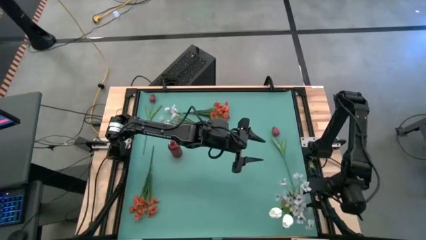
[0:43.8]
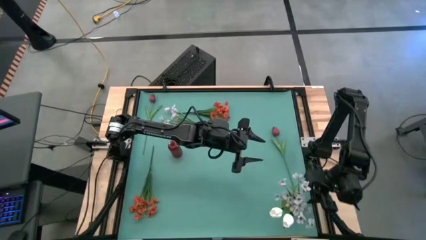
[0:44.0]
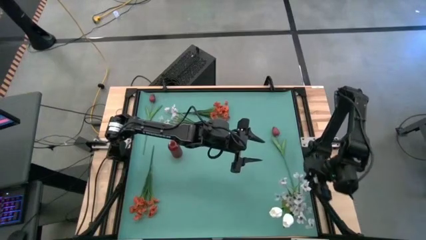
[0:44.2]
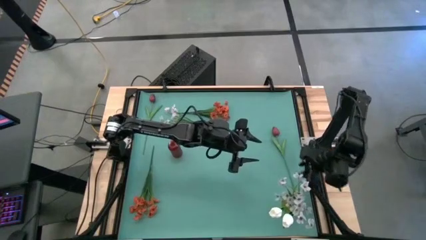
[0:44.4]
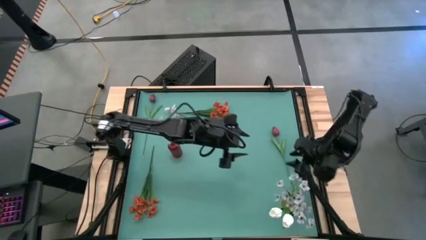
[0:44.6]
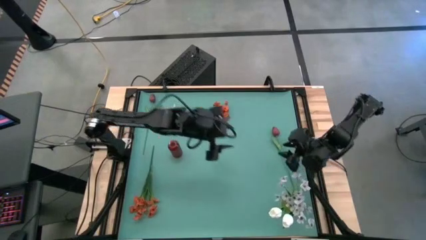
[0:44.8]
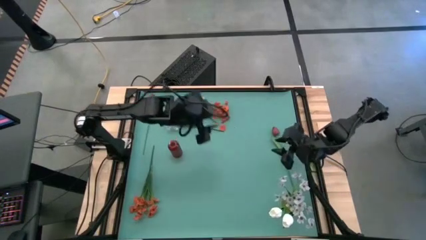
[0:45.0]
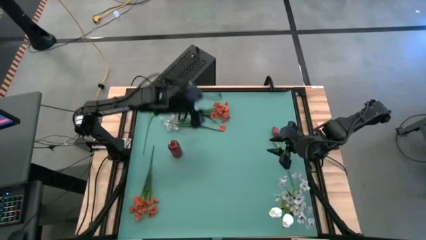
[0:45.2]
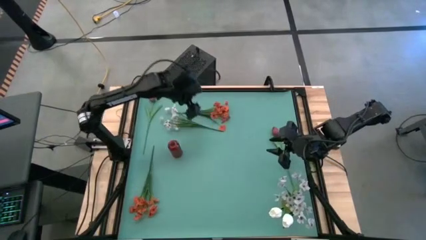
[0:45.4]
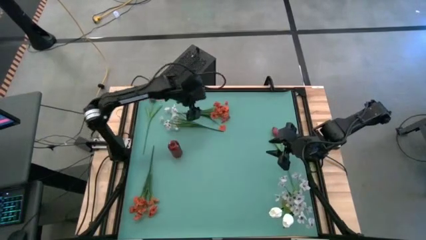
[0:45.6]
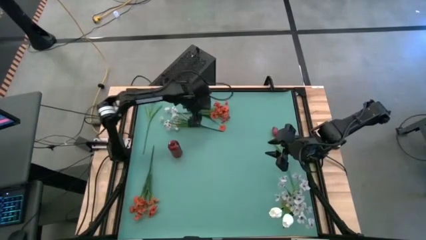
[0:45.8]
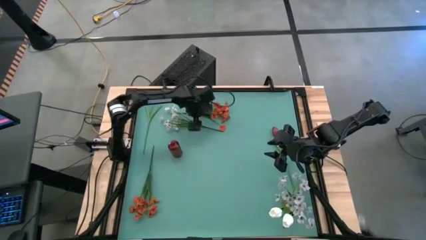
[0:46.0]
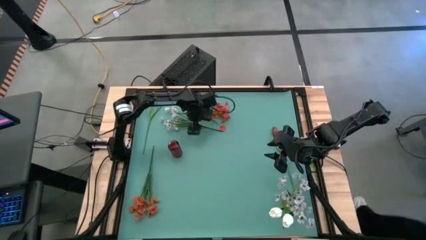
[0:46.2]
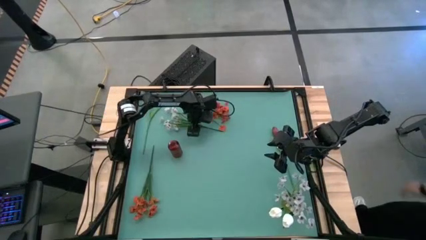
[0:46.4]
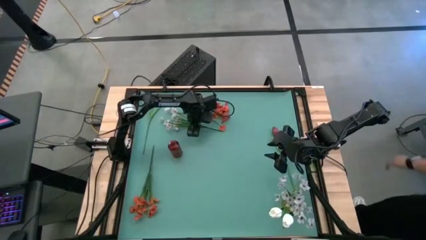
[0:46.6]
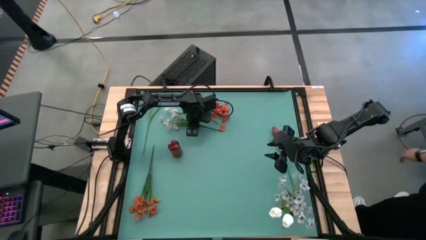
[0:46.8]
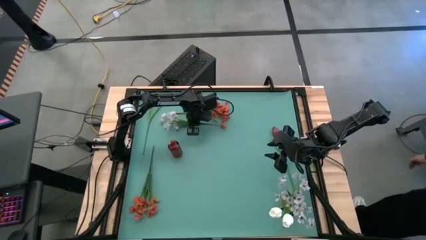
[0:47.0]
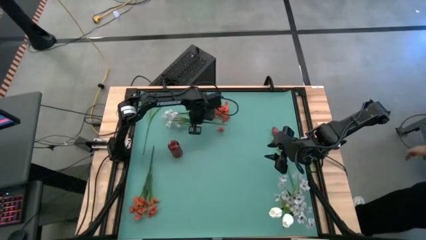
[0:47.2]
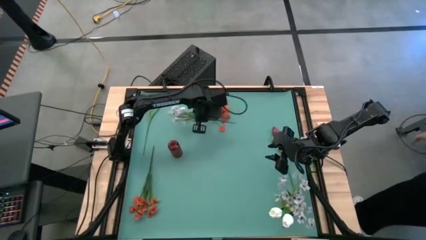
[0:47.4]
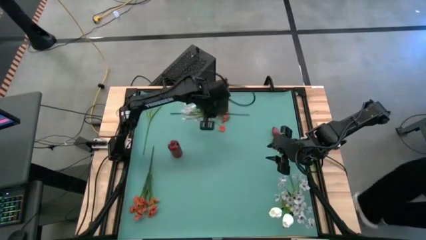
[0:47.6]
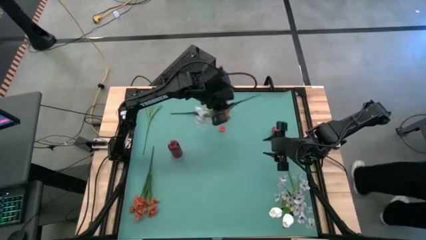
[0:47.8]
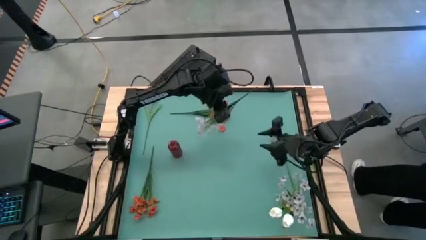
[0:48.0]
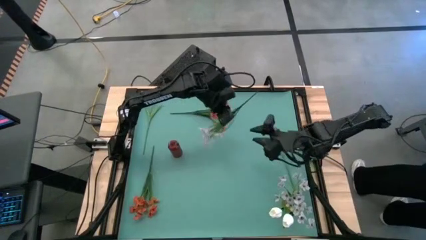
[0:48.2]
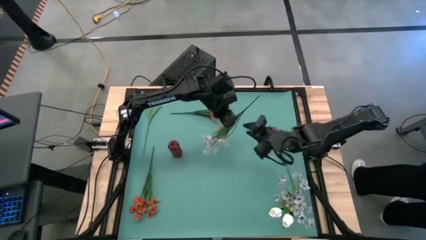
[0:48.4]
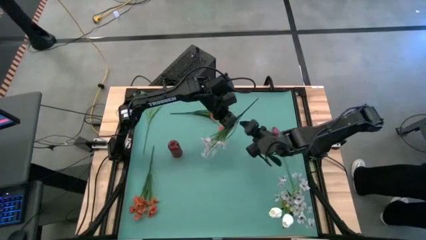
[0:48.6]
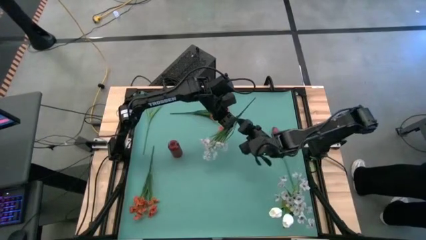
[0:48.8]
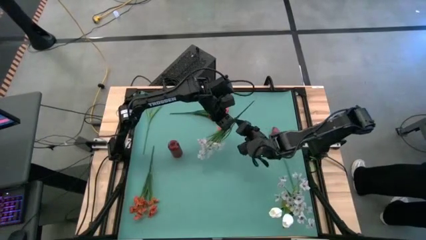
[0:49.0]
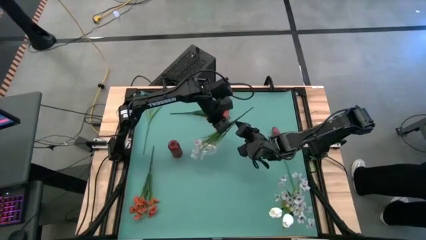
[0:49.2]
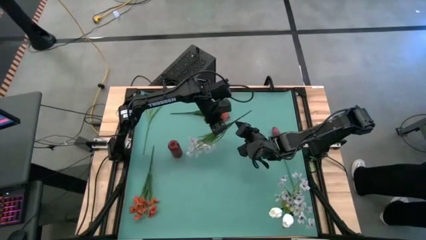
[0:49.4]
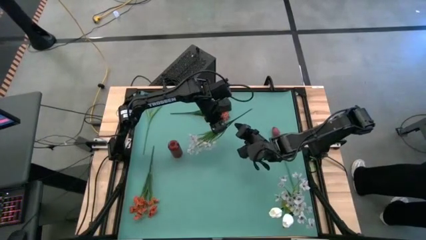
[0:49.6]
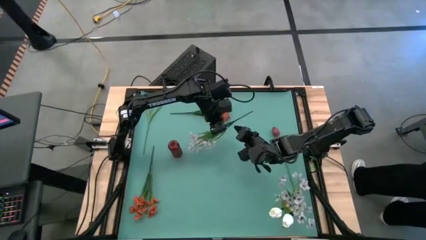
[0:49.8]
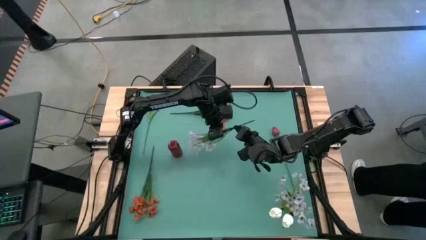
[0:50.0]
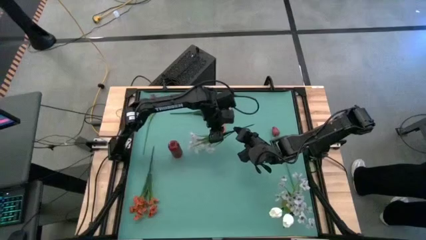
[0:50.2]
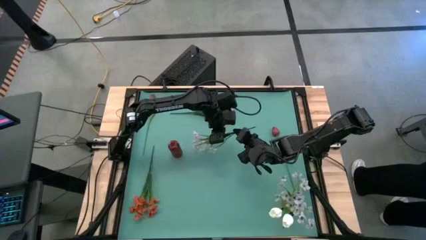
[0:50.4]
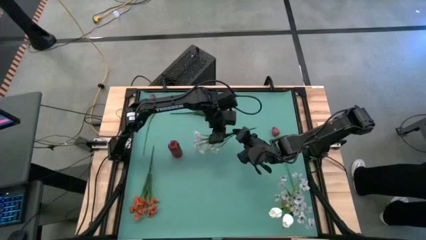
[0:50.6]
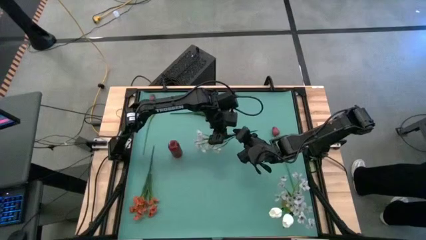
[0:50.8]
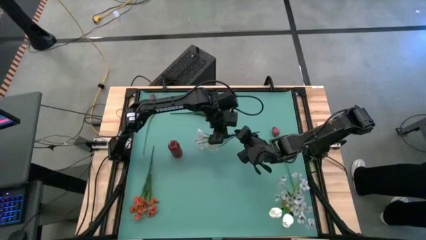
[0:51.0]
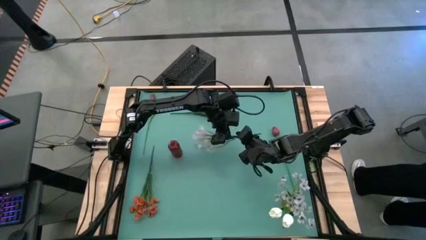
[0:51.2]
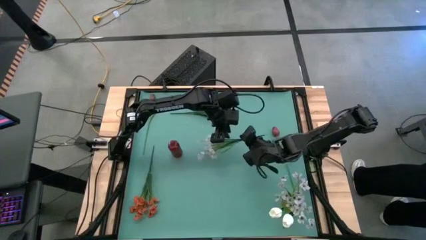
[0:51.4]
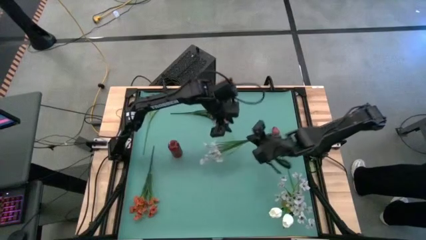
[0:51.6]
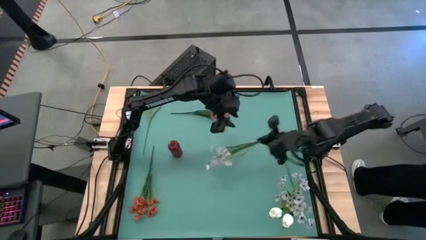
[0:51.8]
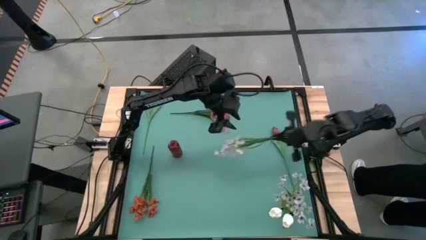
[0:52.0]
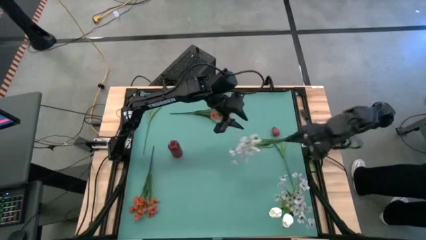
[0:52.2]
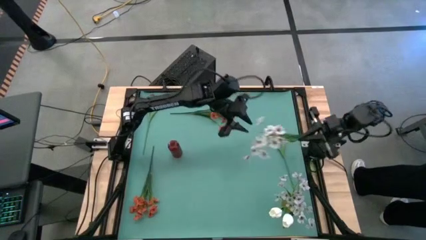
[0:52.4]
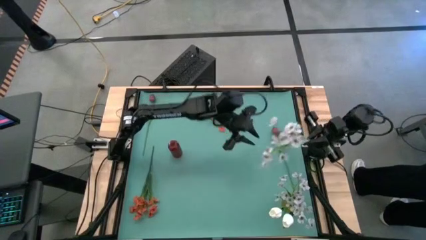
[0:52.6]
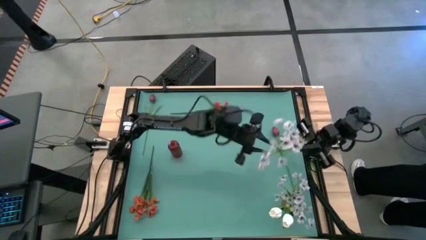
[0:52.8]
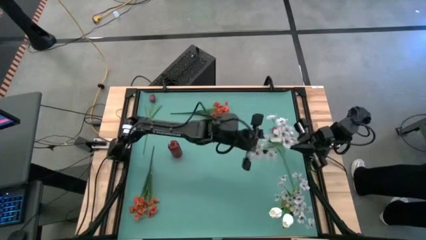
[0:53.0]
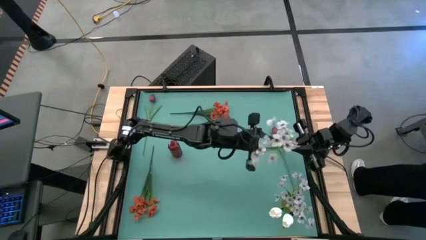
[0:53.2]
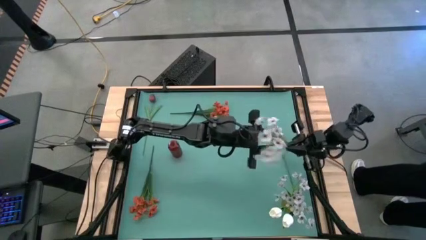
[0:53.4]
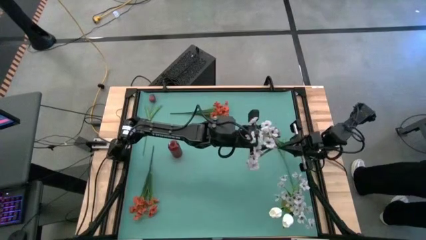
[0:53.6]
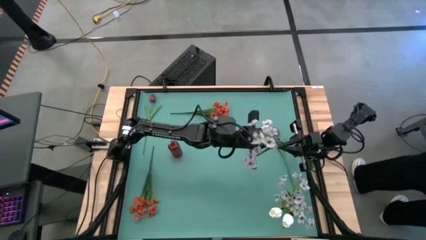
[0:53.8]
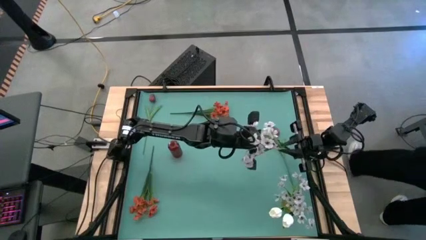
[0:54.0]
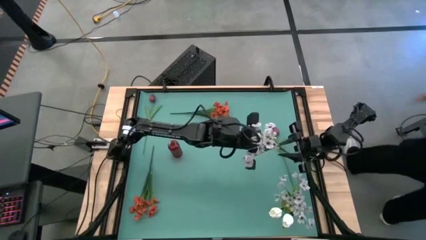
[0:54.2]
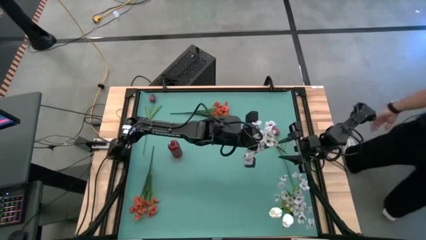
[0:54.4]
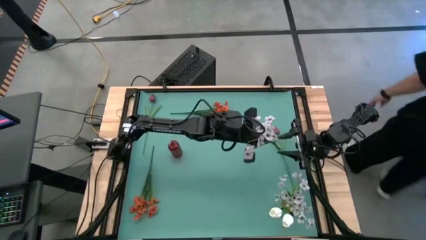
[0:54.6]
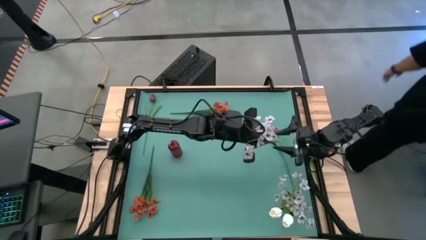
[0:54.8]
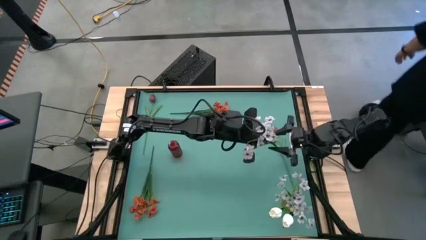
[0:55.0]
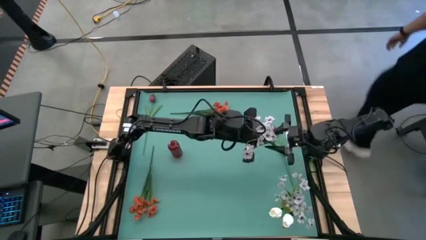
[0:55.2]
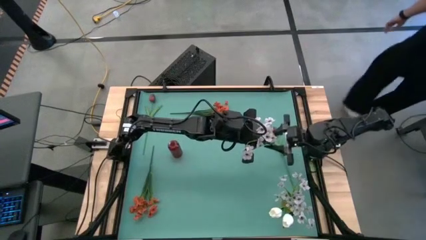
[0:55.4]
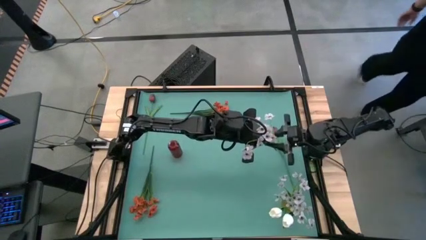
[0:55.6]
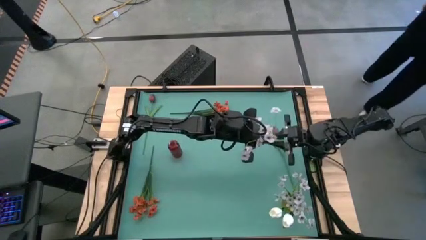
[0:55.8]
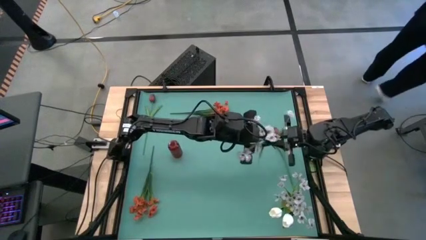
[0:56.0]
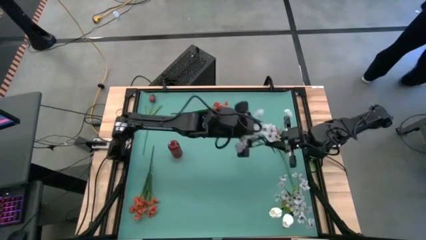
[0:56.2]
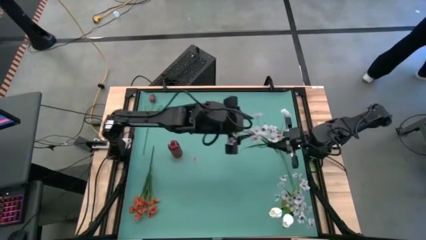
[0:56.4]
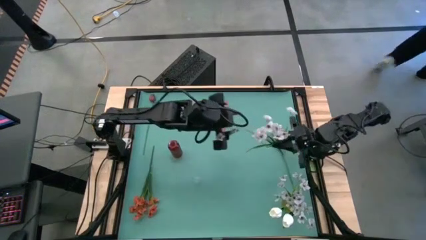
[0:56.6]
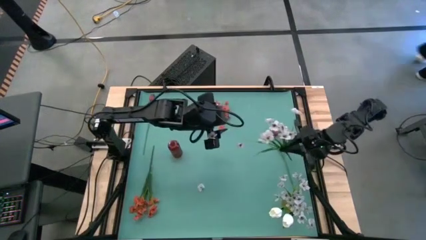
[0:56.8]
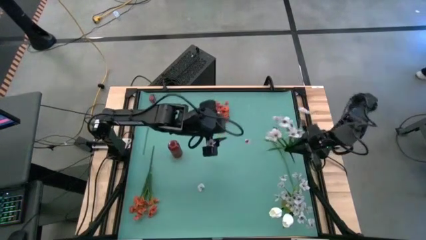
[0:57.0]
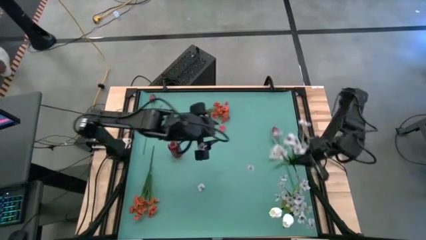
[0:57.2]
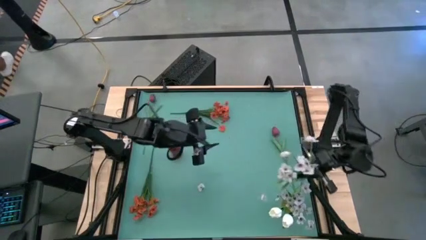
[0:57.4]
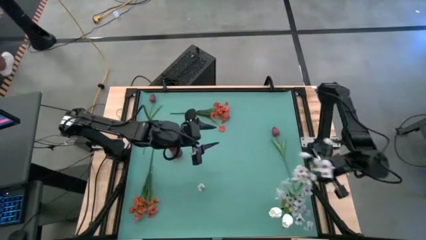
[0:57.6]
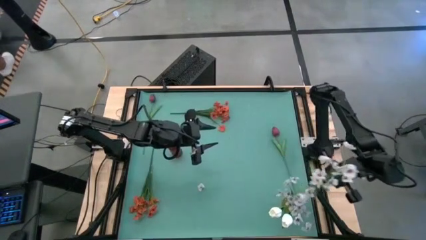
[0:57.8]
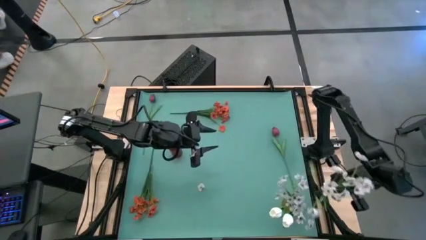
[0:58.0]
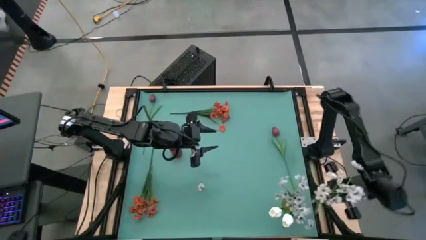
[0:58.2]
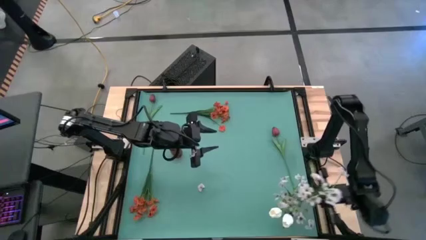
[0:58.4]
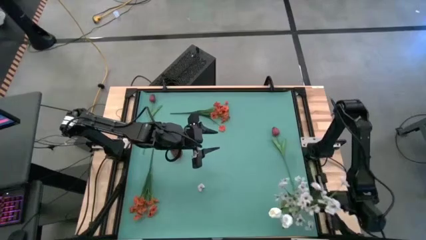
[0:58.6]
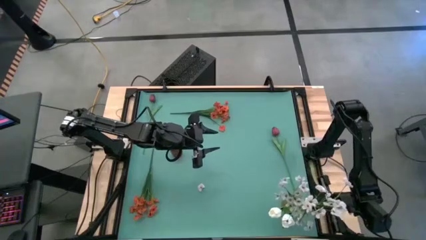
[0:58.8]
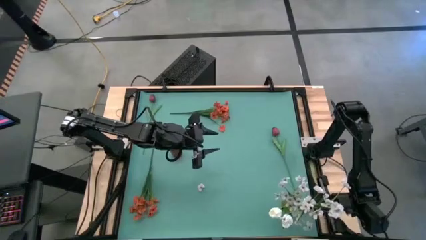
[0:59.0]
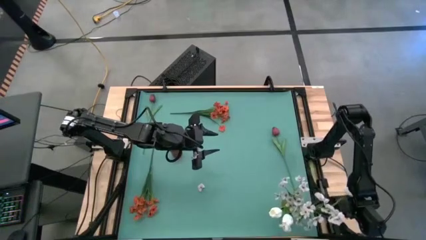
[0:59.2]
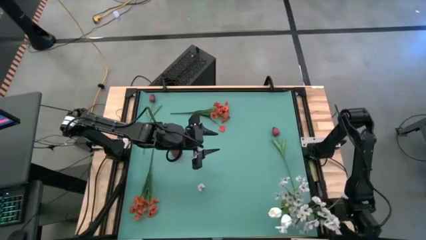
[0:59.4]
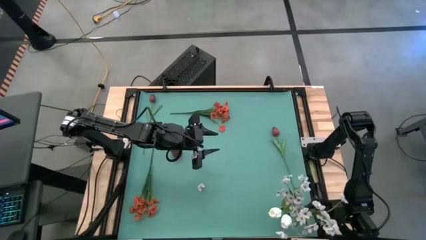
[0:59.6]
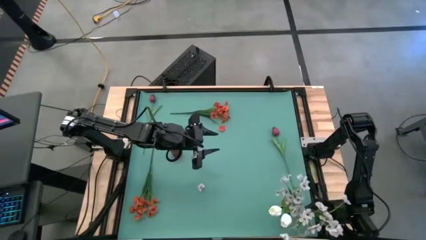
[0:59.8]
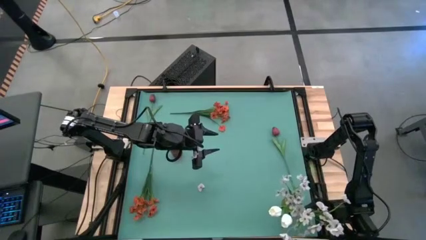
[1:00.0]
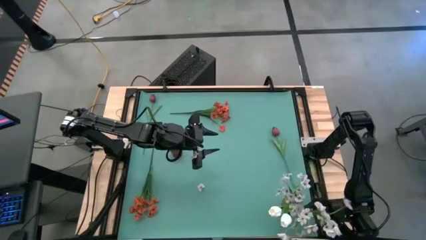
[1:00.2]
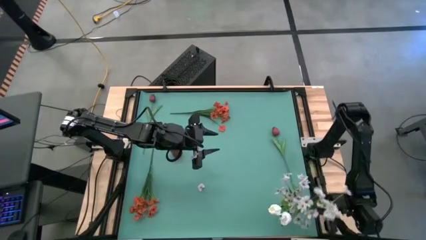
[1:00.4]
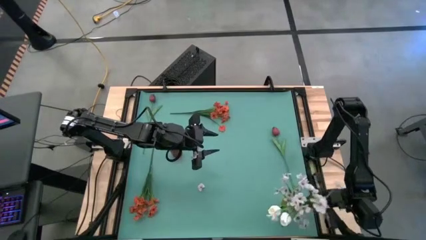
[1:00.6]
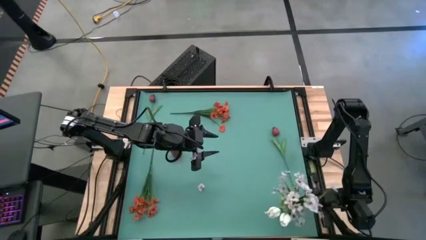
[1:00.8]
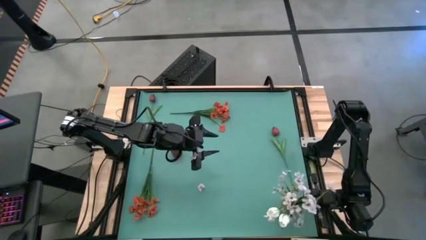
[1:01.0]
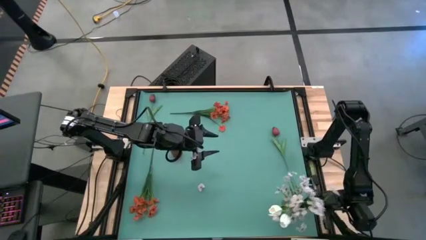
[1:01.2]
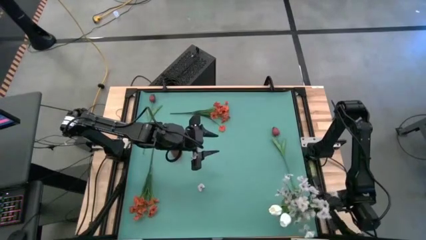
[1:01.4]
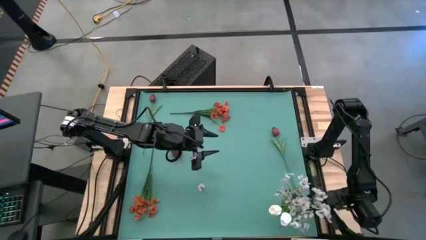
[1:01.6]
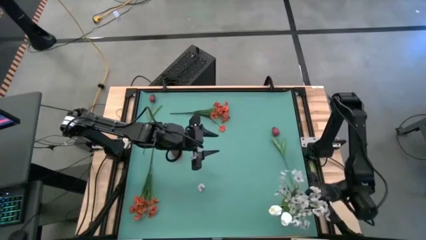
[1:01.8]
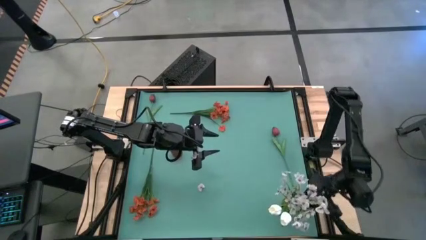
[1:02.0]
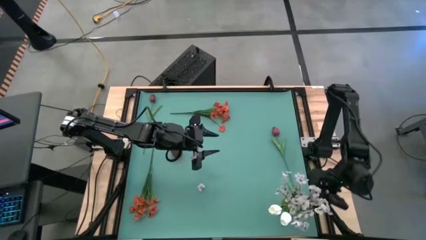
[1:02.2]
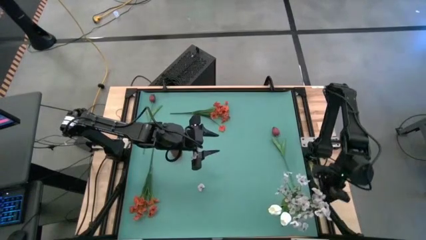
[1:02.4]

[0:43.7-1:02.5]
Task: Sort flowers into vase by color
Put the white flowers into the yellow vase
